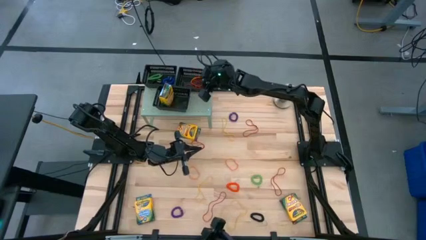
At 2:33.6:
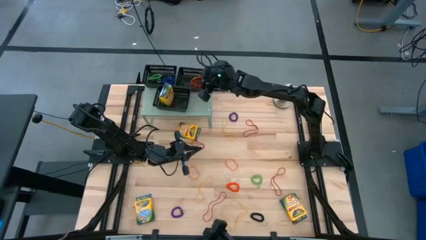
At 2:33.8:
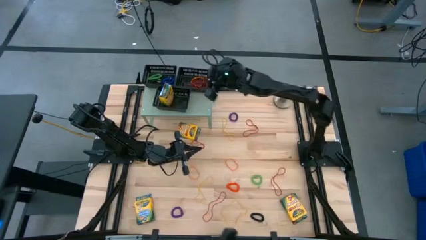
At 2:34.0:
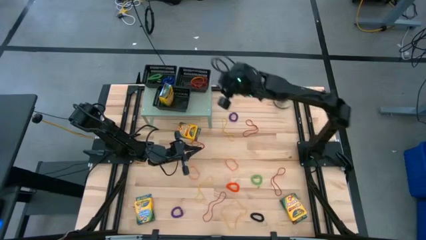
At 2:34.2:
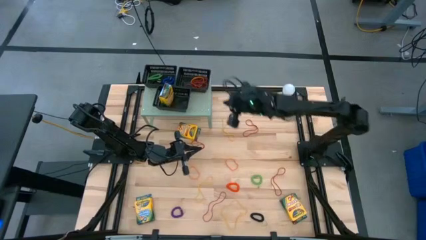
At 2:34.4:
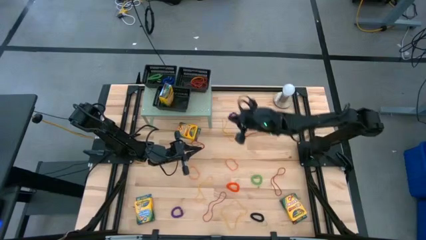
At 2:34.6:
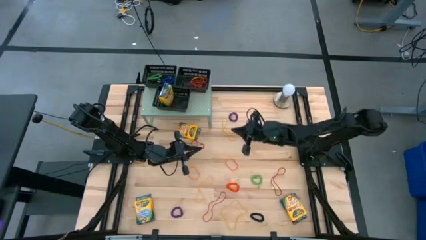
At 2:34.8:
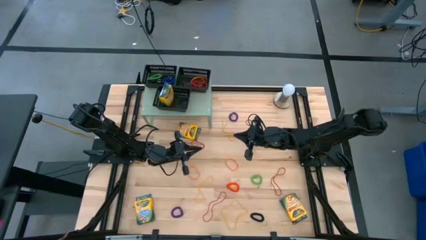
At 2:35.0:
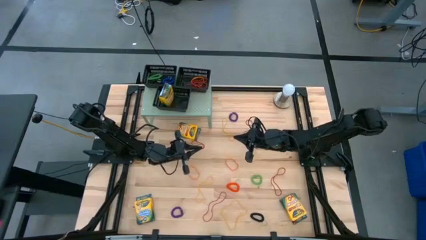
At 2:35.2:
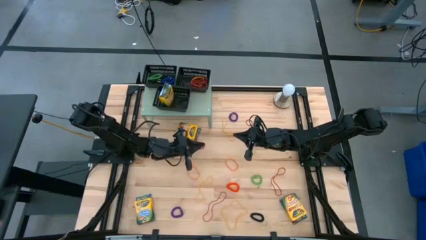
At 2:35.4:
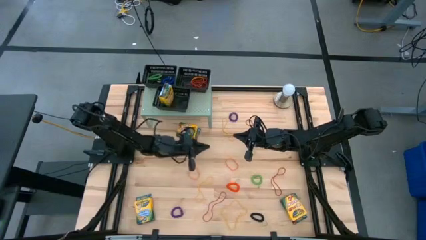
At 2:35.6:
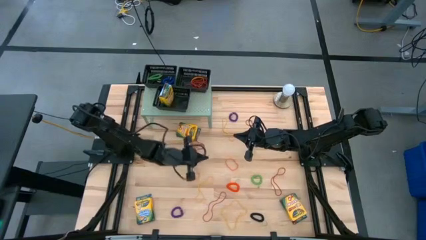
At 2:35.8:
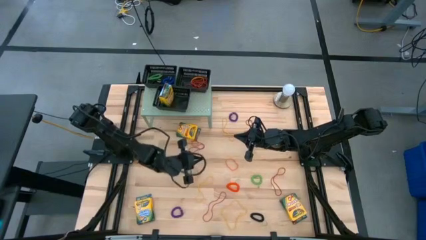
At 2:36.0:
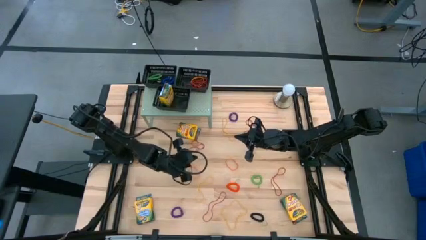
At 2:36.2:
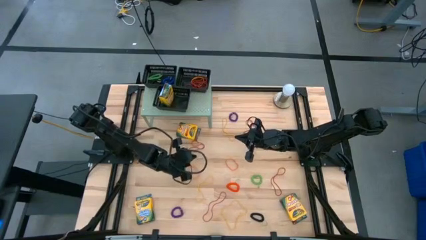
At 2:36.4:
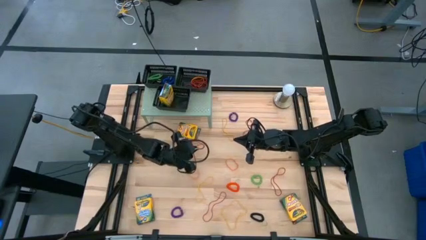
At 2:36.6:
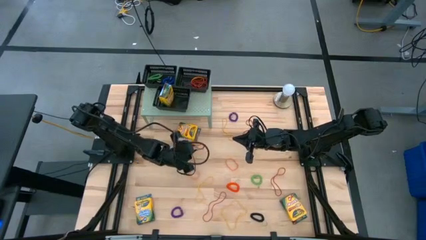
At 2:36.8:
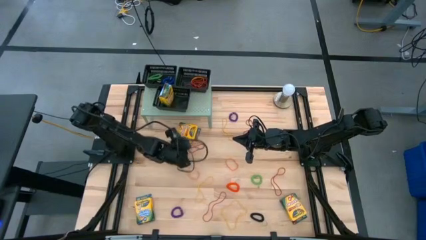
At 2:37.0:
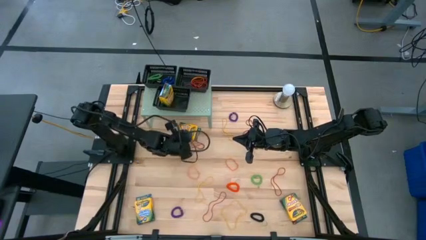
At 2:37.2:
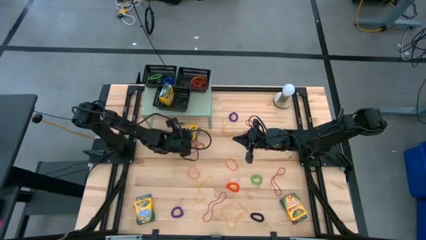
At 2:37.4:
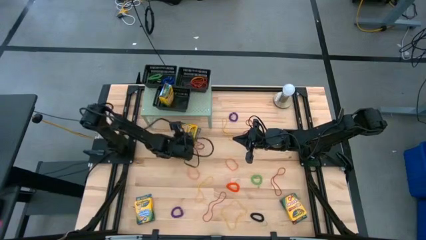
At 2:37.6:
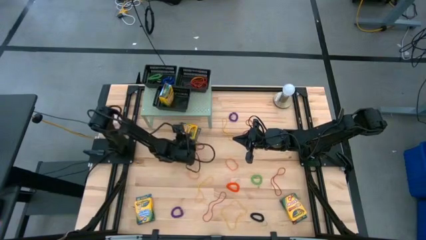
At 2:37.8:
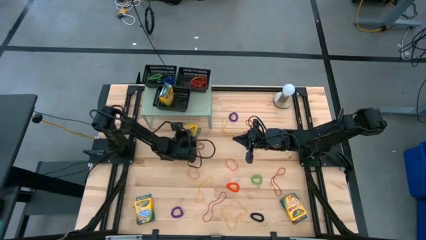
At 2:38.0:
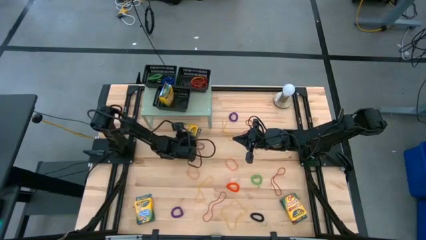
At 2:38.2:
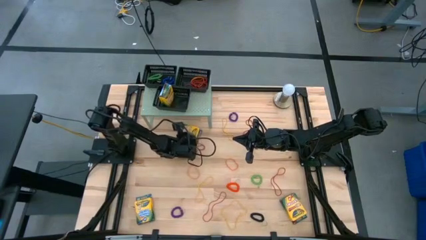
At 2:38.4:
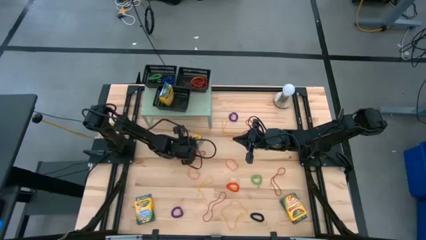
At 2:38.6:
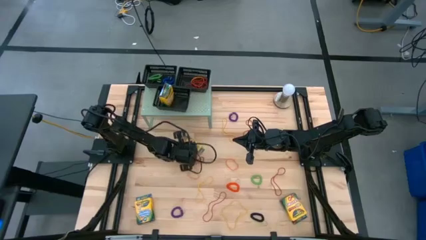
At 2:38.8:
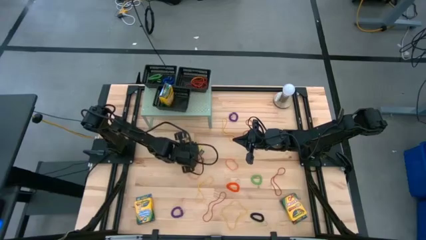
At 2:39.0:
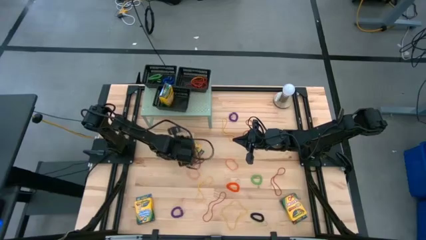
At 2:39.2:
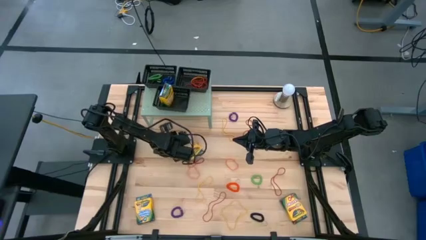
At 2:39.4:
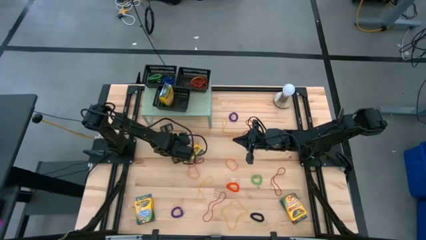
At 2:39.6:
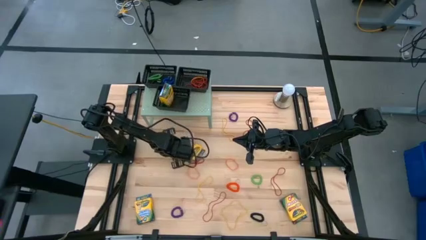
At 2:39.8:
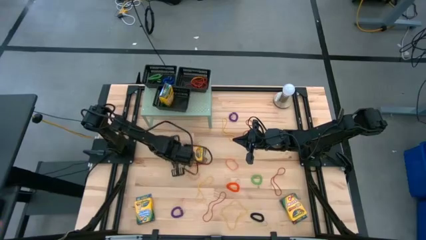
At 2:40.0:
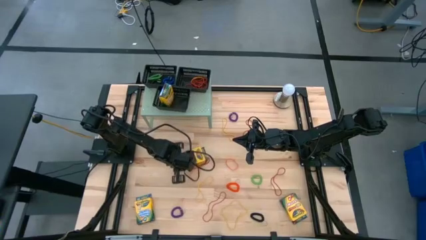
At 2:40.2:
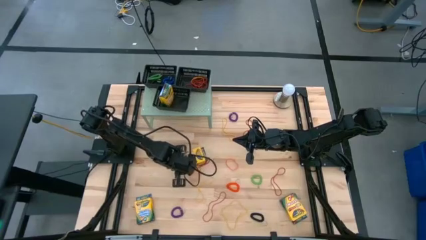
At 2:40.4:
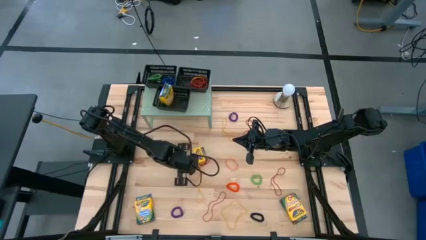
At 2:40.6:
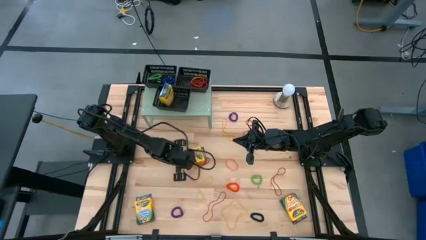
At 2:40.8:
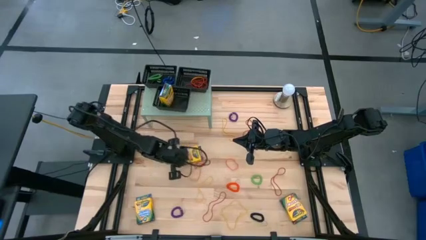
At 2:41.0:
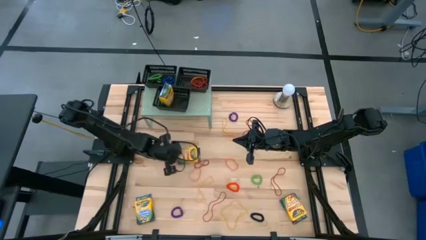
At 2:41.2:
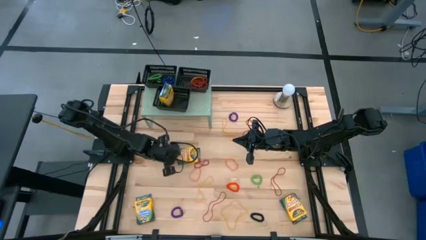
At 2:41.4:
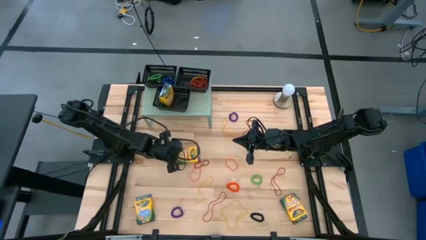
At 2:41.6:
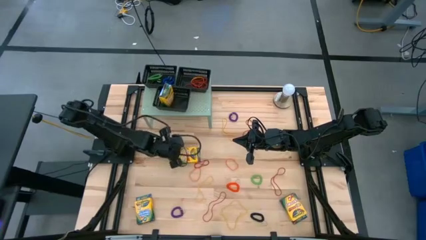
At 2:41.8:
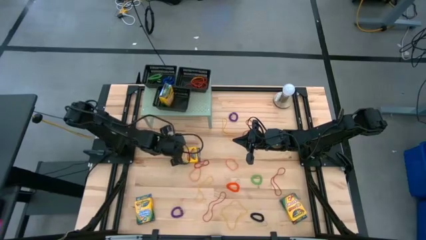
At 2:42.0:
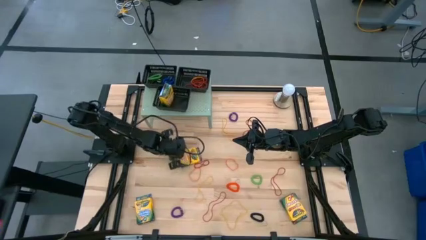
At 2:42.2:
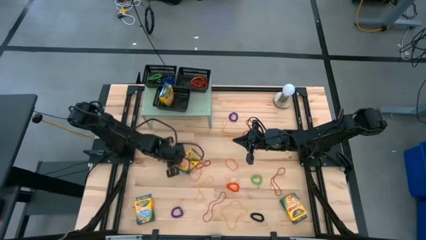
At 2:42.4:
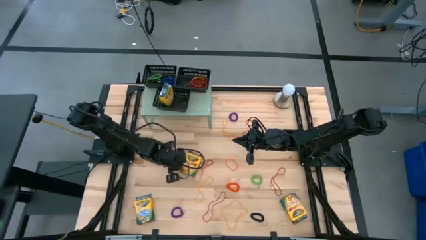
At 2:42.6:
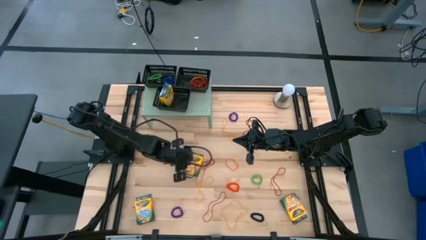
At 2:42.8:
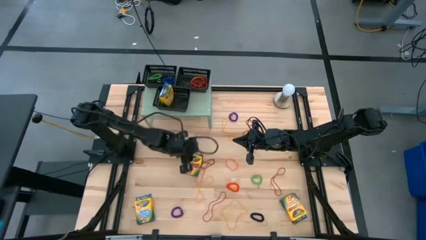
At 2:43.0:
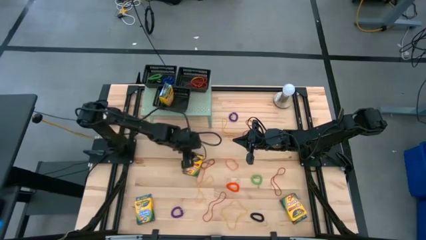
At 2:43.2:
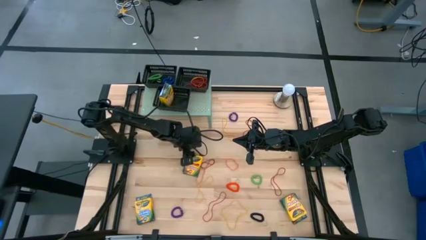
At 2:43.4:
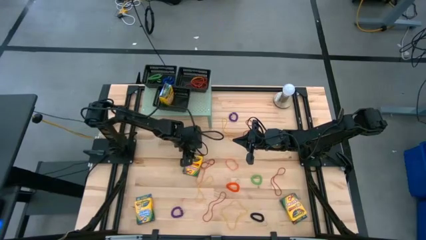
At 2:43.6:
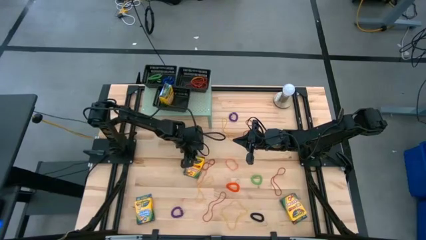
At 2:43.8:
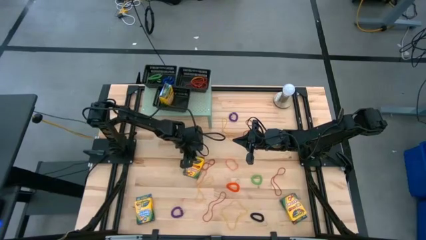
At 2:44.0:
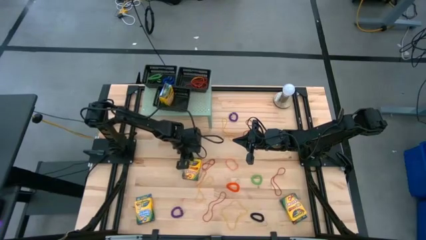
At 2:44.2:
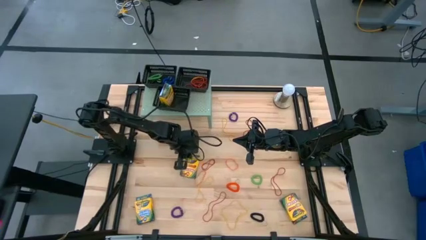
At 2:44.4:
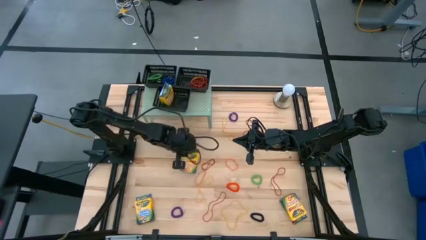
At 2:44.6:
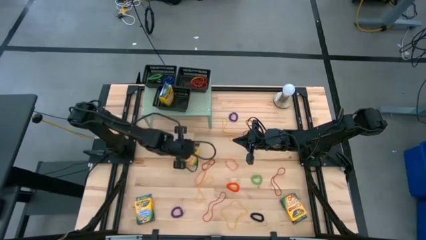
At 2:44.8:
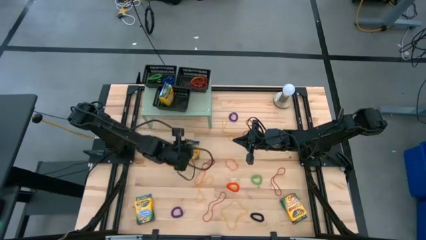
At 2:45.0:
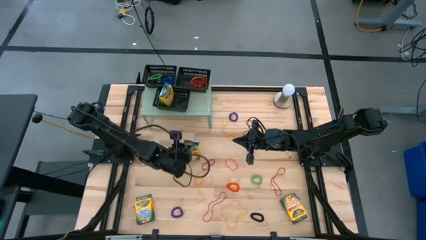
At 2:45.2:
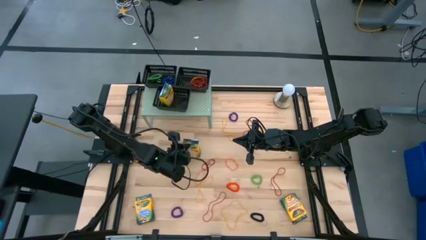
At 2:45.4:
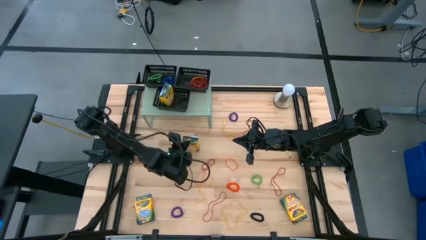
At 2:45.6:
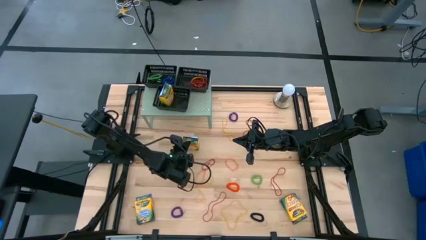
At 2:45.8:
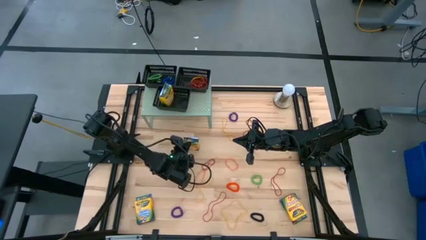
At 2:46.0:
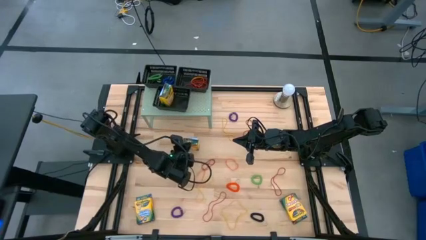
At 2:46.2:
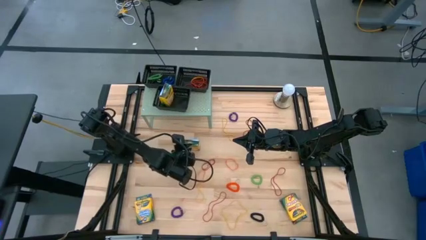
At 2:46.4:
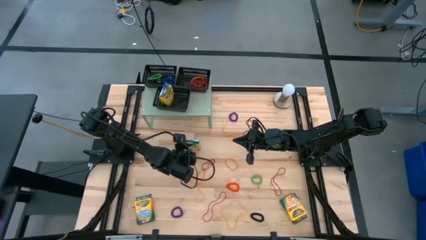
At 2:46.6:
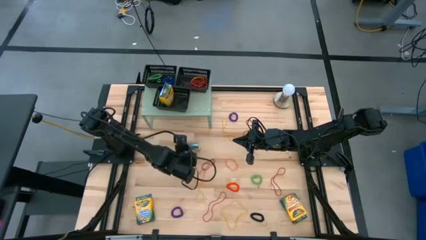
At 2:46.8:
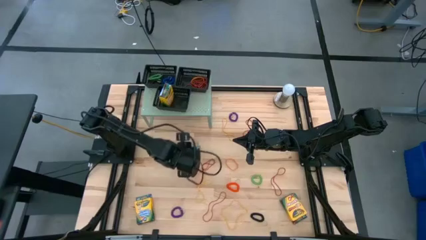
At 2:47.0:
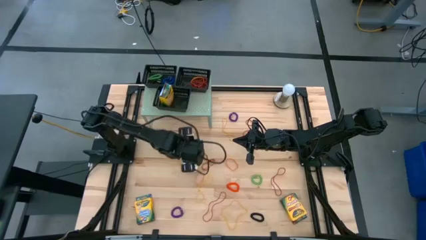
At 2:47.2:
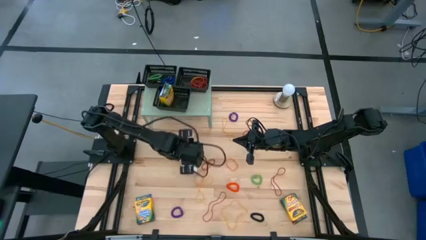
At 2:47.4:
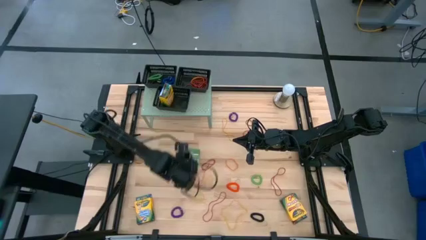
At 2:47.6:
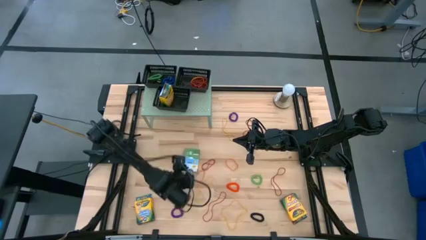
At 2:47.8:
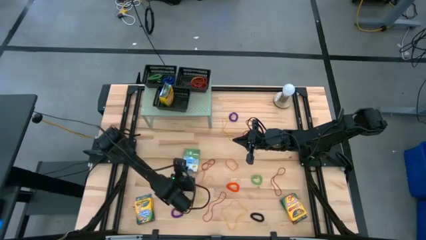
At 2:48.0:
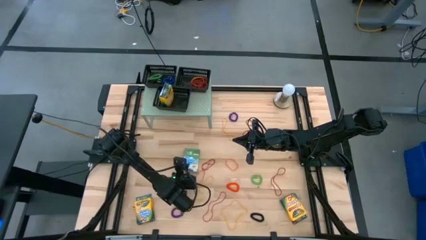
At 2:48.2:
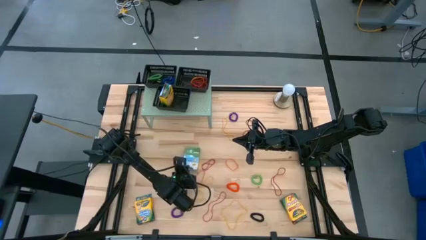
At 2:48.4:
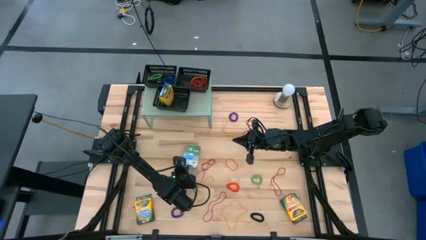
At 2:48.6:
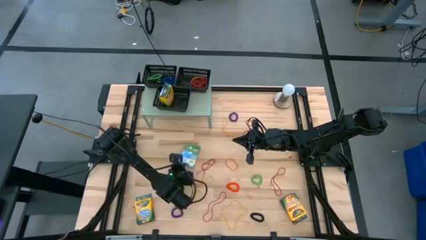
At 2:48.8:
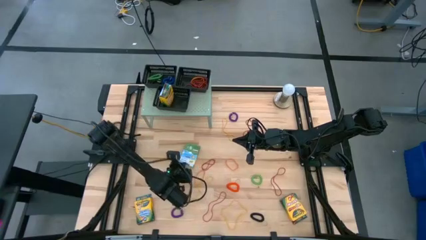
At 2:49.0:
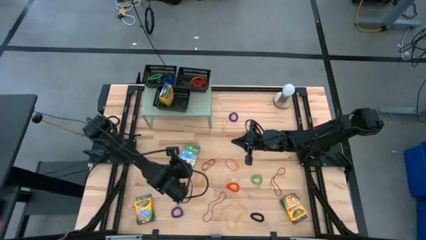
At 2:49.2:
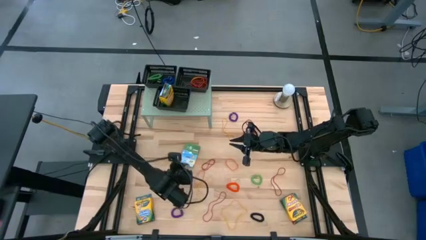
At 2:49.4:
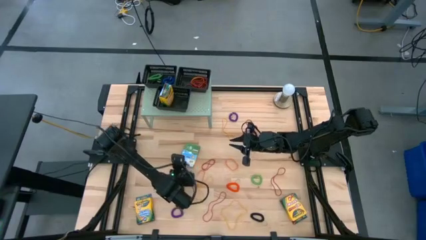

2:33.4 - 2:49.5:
Task: Pick & Place Office Desk Supplies
Put the yellow crayon box into the bottom black bin

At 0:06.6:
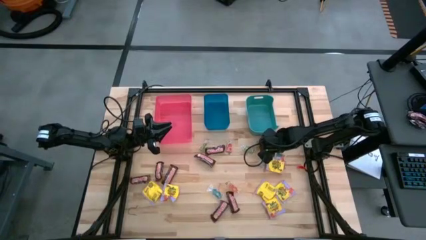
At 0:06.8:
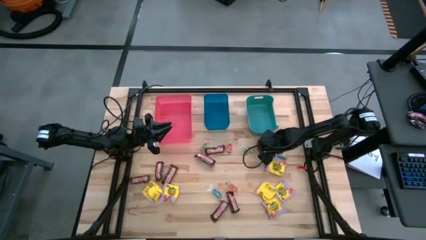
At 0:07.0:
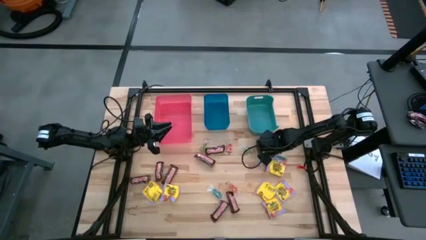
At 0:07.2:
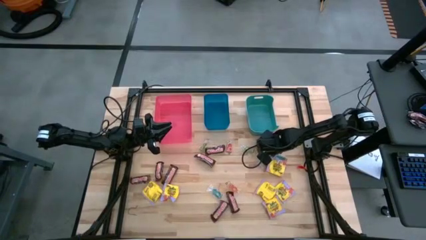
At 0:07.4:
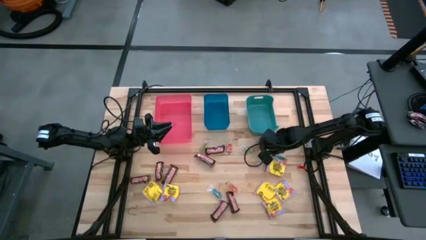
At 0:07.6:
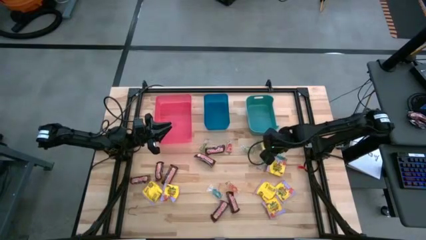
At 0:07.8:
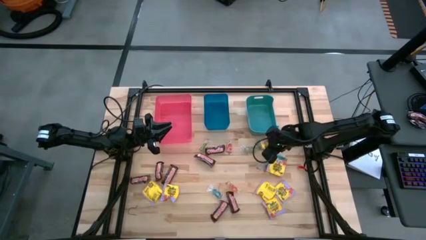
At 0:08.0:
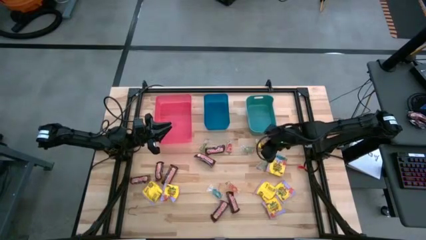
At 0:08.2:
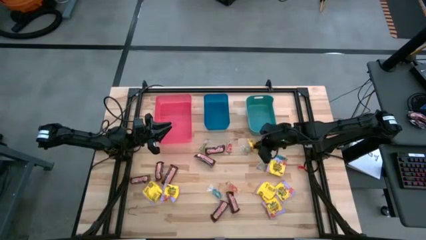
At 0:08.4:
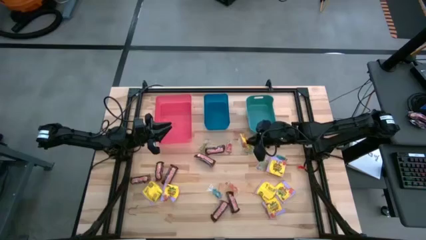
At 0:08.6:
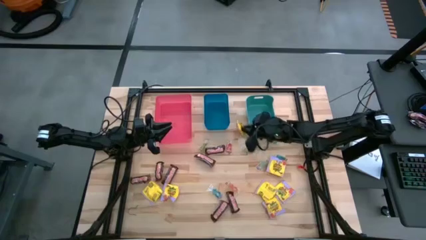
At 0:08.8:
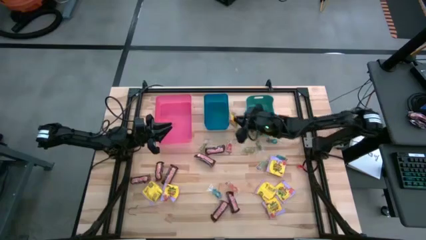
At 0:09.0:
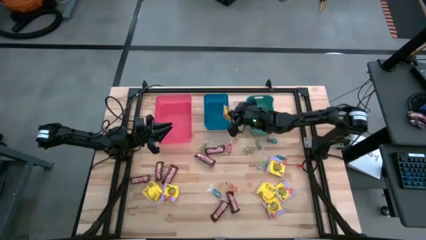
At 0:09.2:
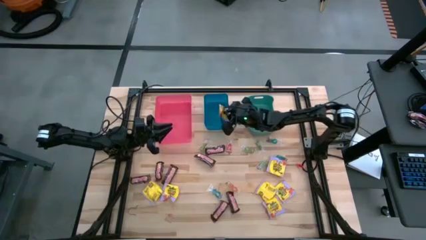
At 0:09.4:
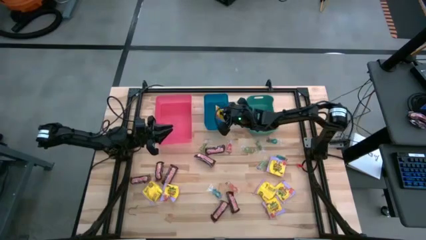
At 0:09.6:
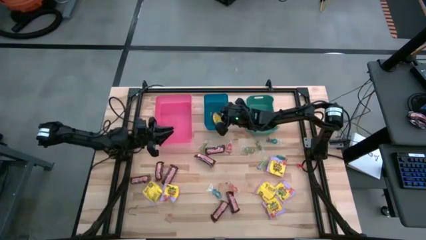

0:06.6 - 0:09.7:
Task: Sort candy
Put the yellow candy into the blue bin
